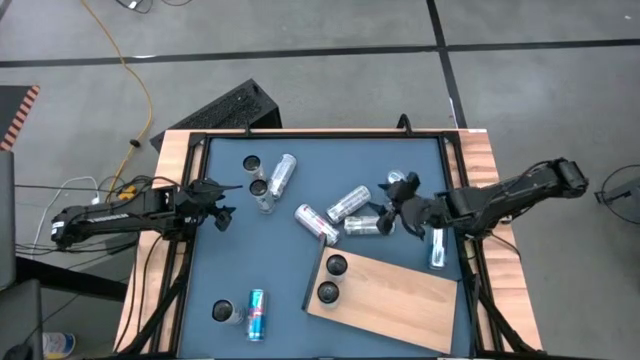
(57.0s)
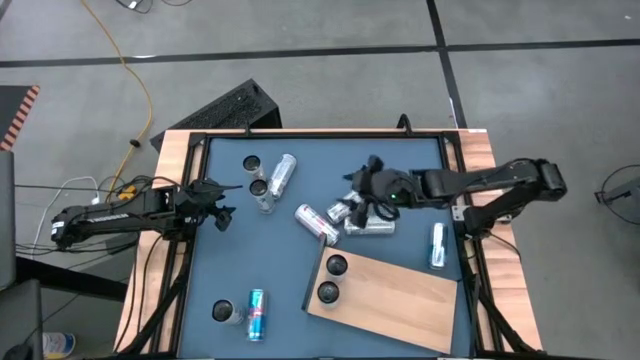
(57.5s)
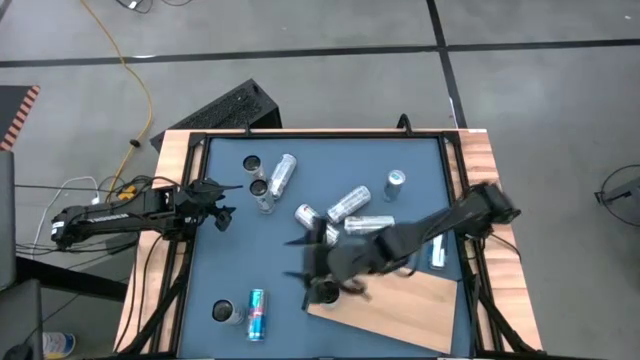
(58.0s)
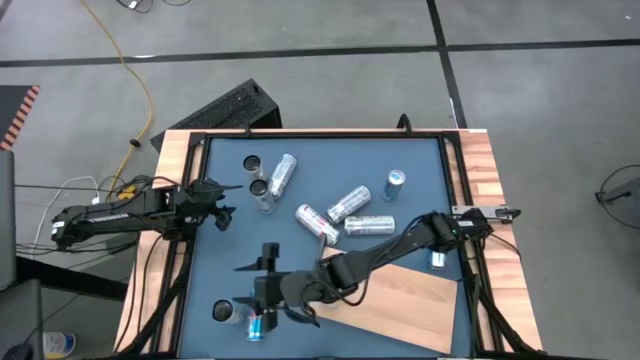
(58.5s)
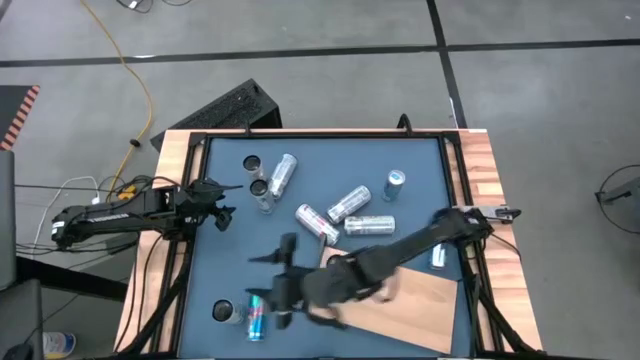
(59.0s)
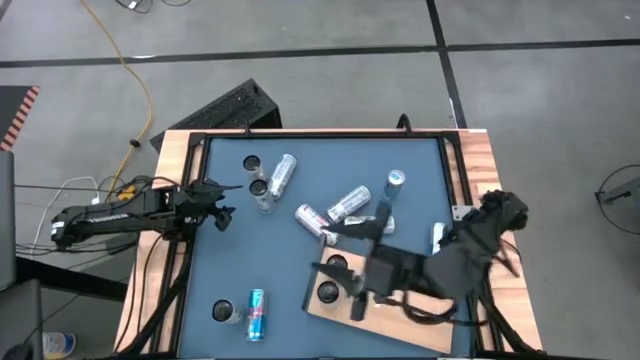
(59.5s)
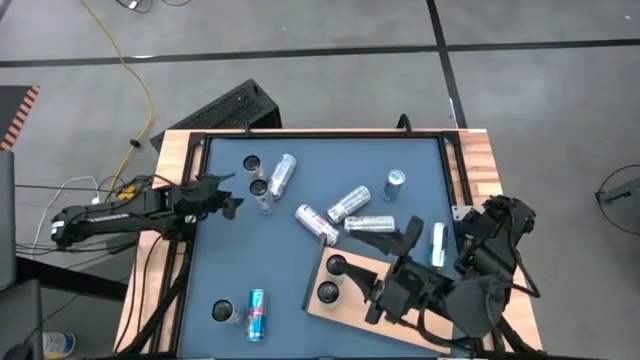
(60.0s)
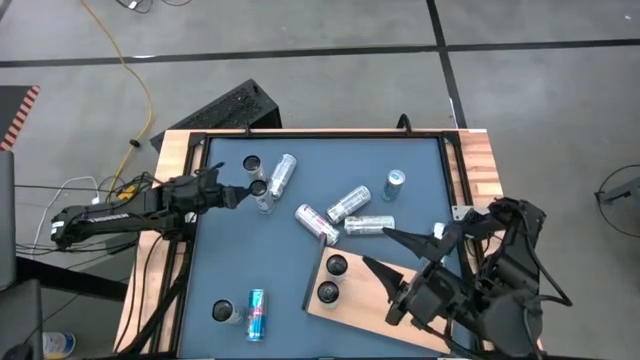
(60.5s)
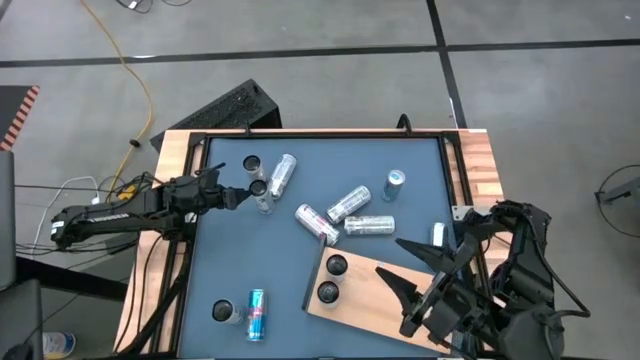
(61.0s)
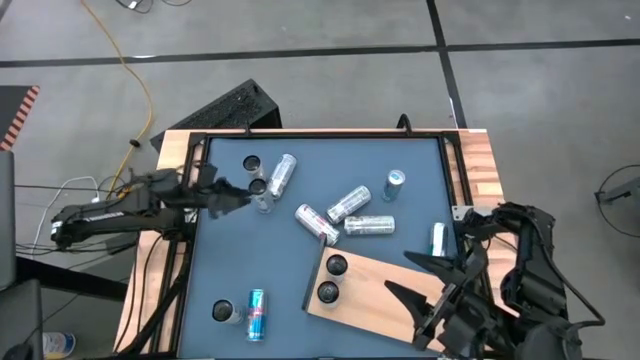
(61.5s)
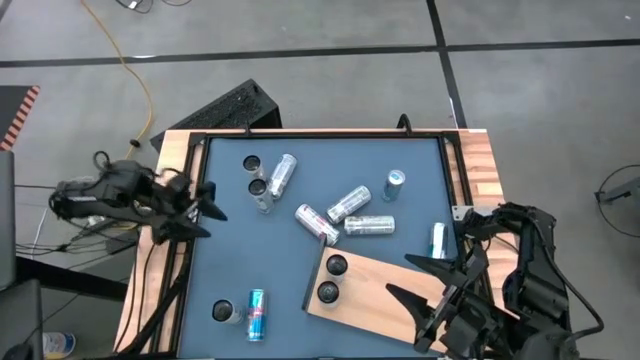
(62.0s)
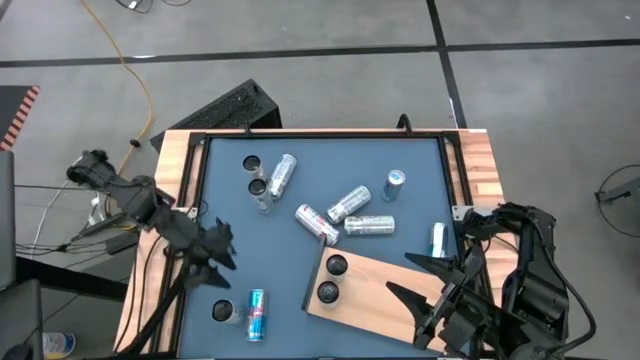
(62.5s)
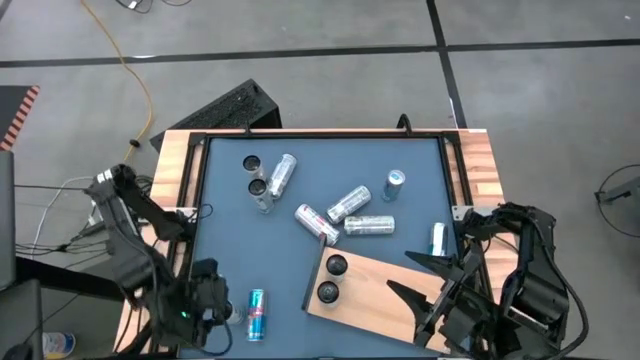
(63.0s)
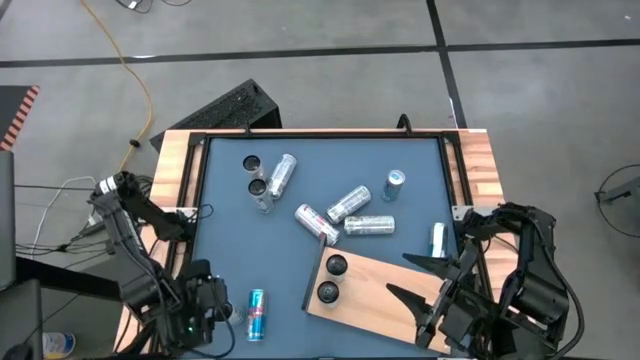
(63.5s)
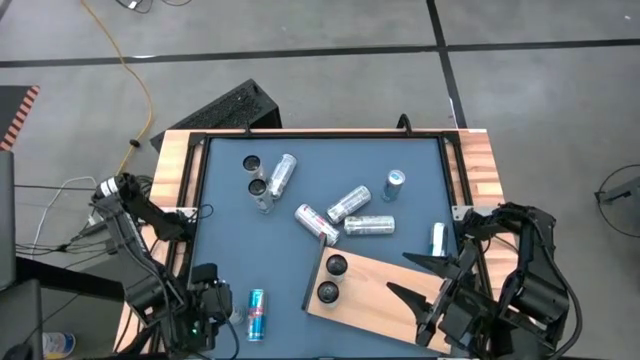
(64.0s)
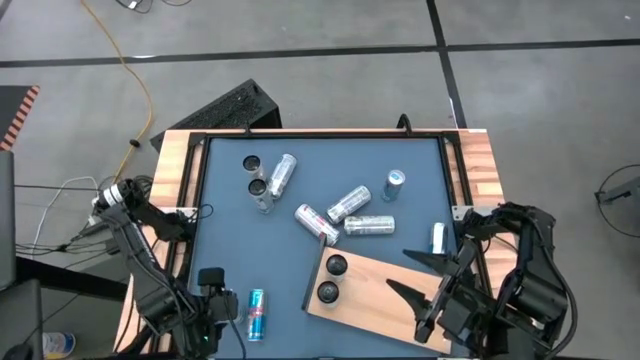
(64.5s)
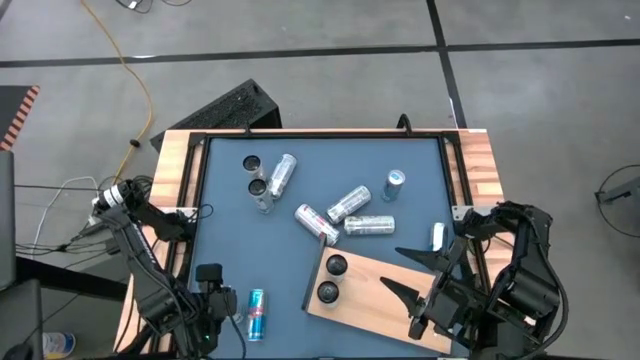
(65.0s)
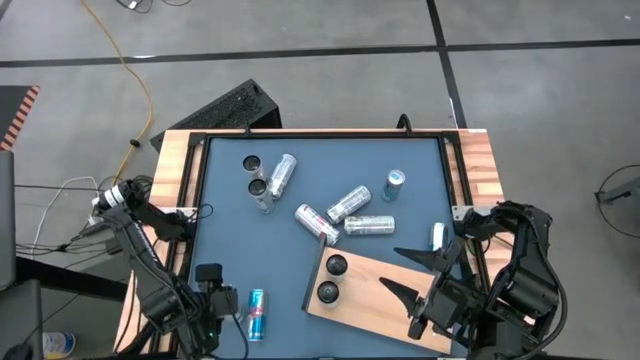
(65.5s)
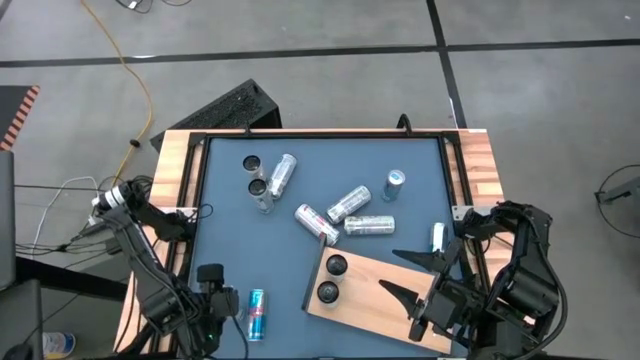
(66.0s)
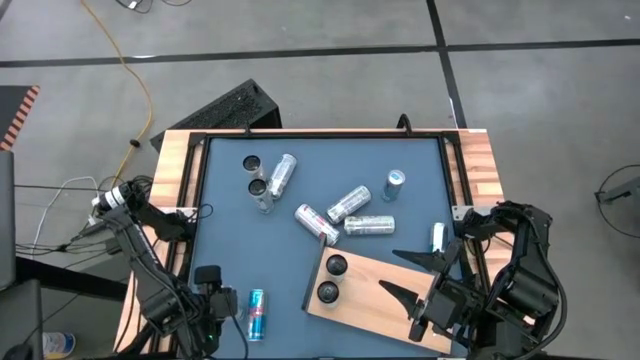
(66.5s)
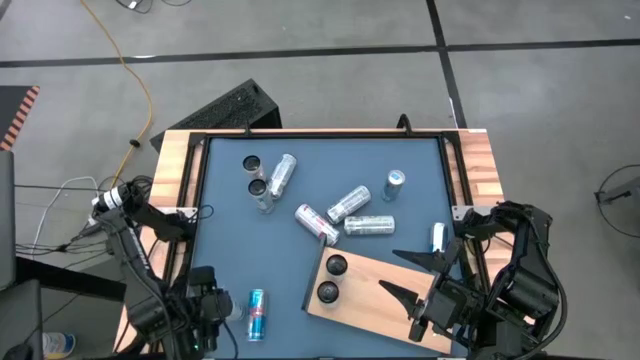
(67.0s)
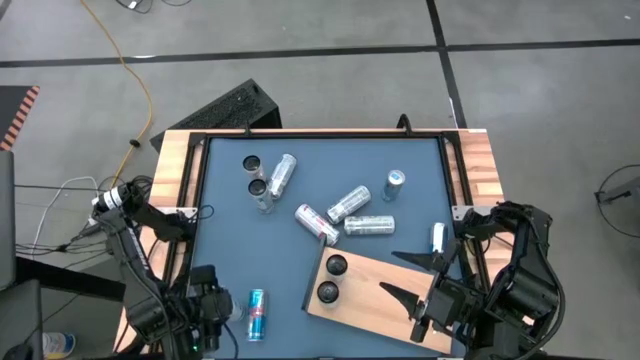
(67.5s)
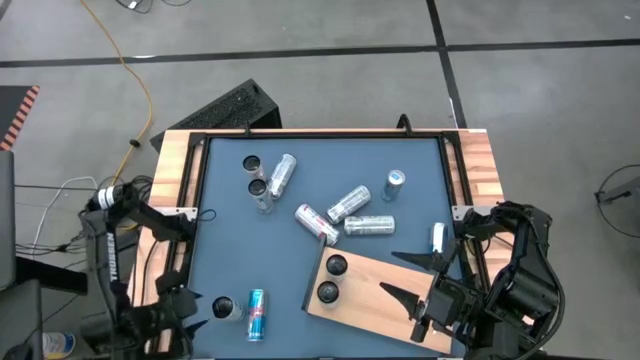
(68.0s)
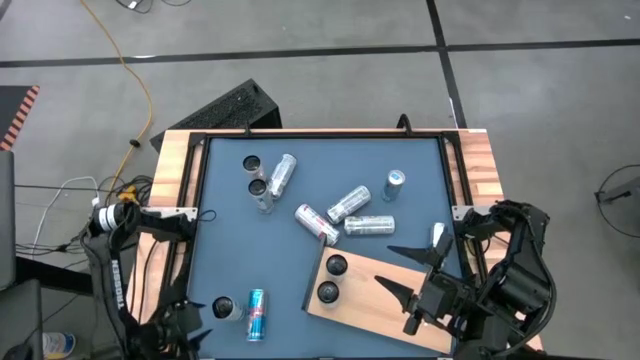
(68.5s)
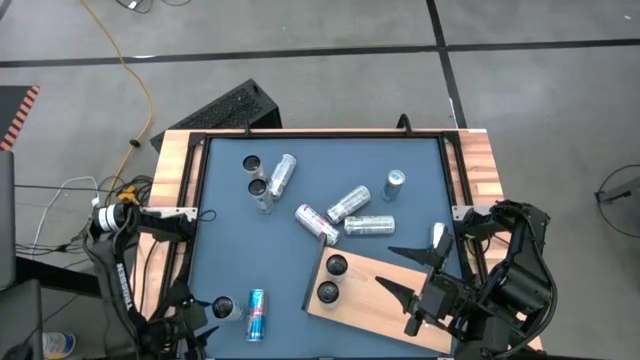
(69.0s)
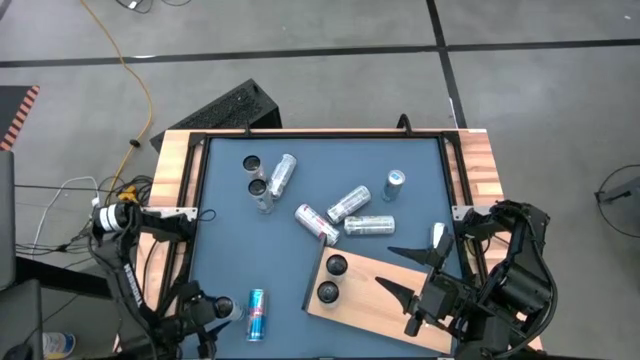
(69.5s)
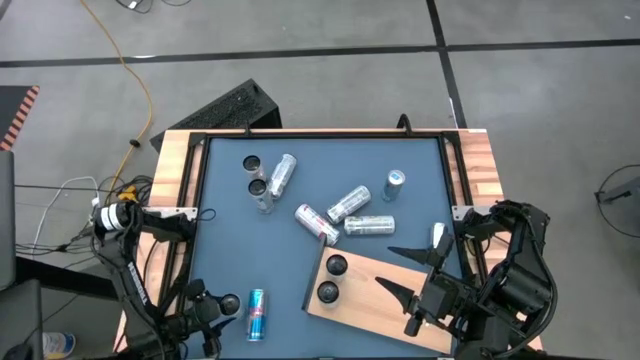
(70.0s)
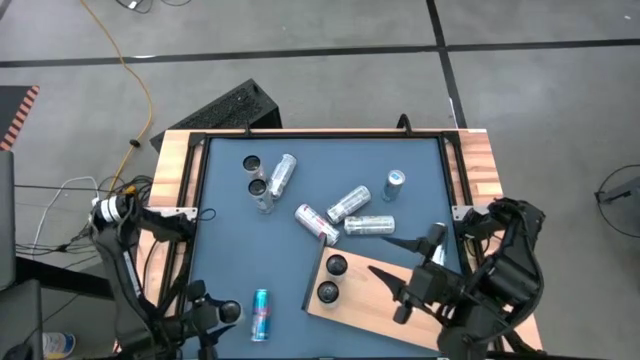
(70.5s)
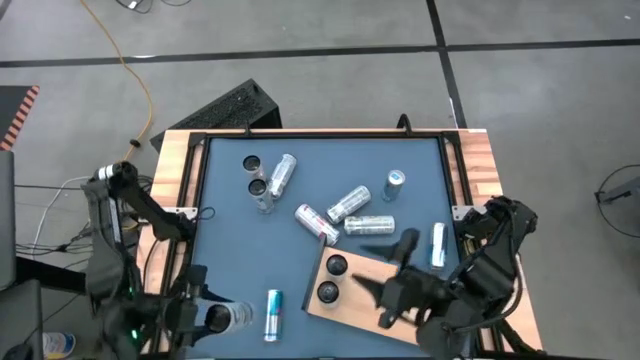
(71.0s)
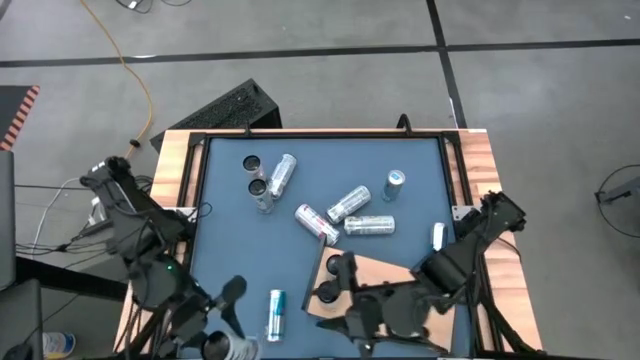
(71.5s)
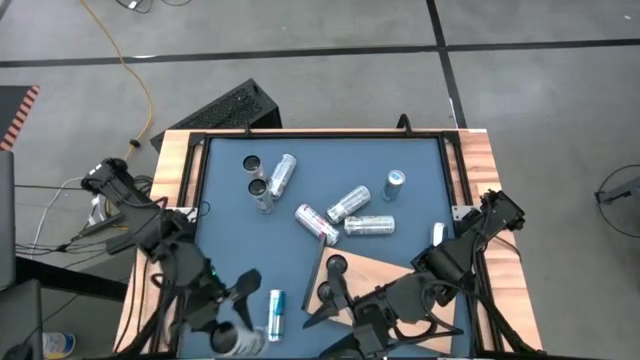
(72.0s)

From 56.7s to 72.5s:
Task: Place canned beverage on shelf
Put the white blue can on the shelf

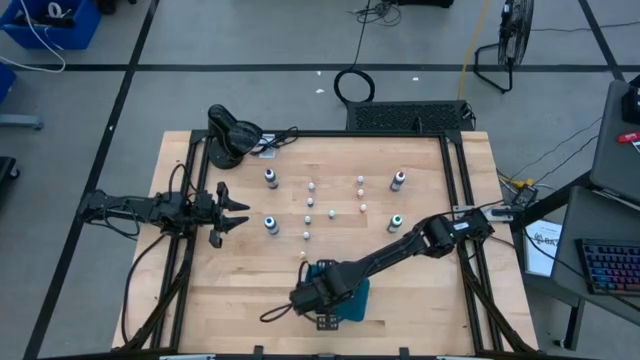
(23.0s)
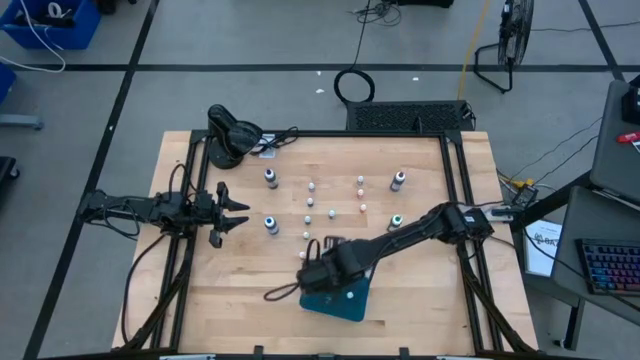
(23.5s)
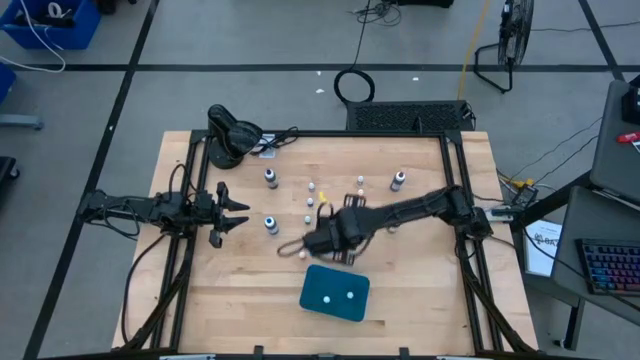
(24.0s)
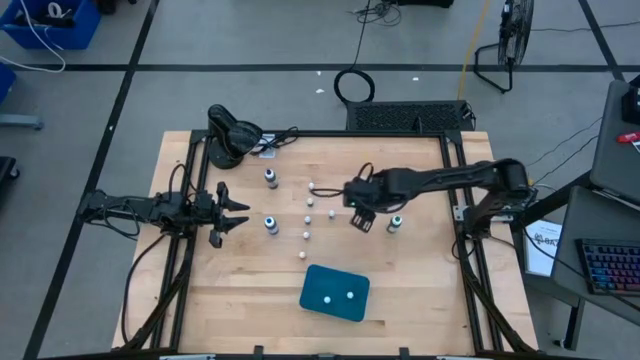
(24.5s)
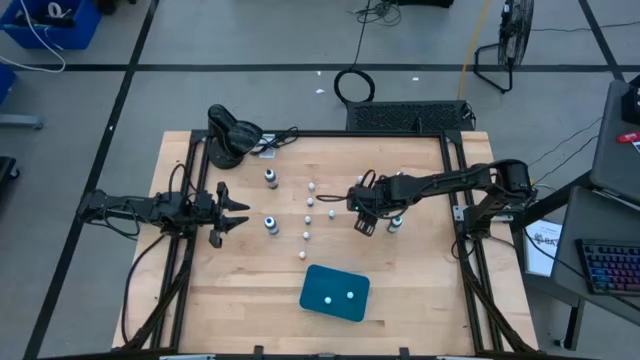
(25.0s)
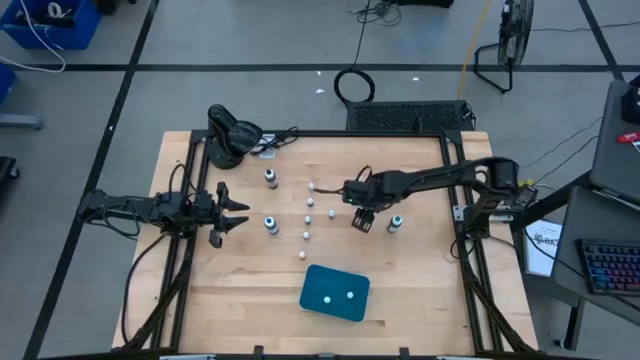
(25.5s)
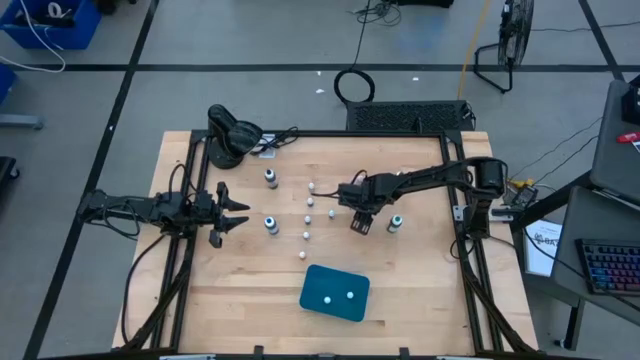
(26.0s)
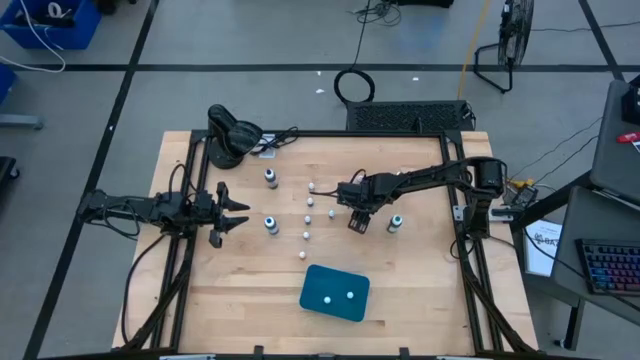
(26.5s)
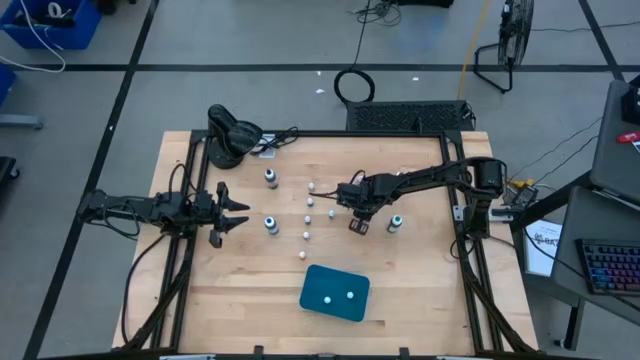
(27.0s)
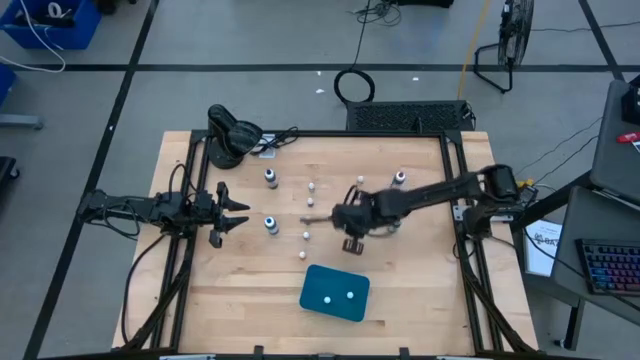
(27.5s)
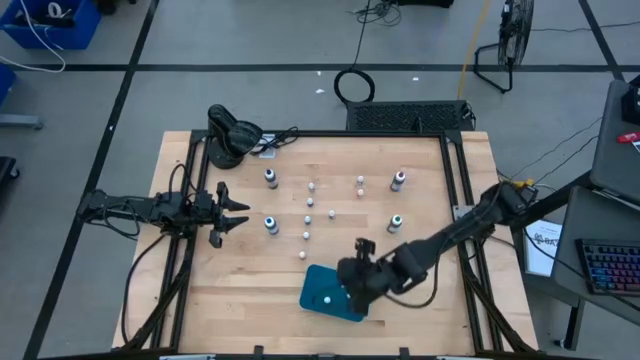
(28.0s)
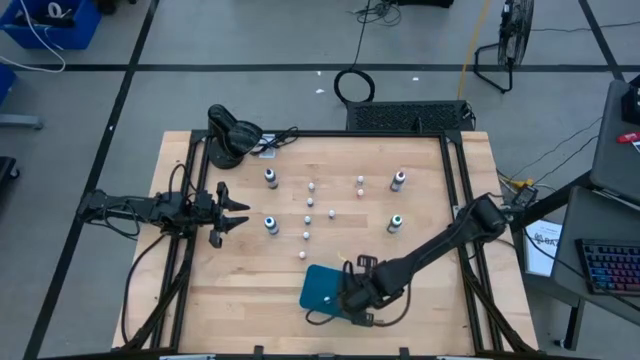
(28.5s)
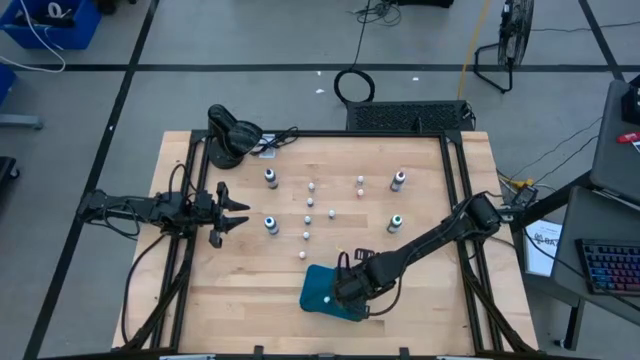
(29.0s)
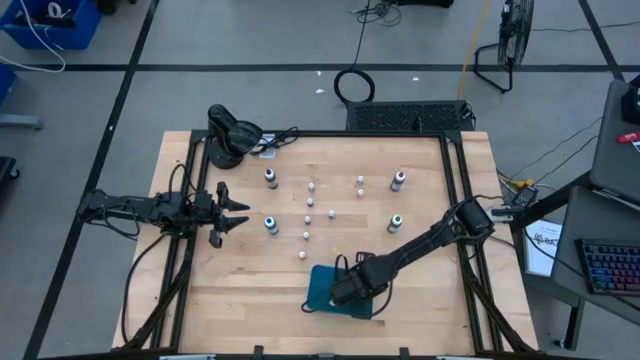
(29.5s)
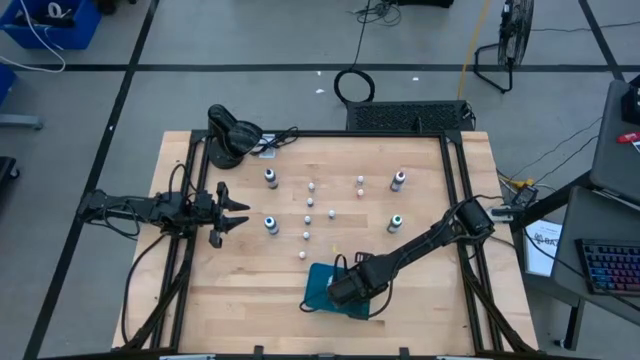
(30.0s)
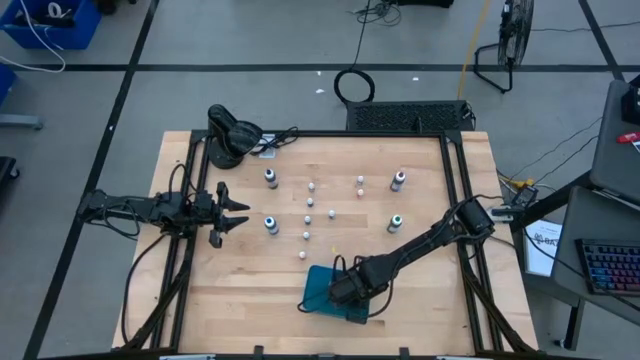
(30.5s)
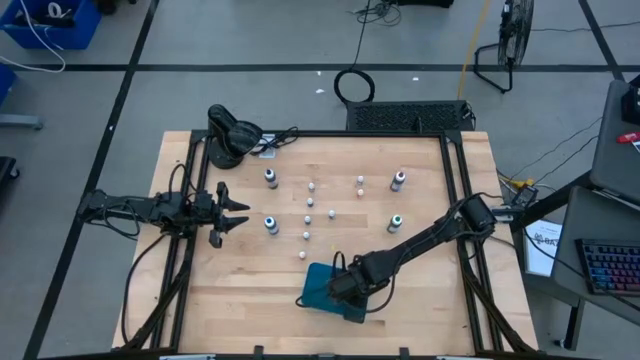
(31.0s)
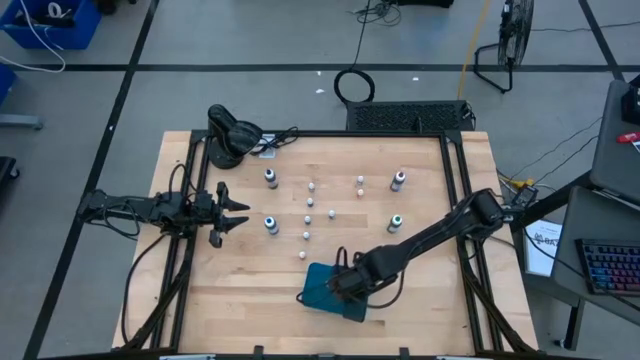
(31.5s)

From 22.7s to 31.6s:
Task: Pick & Place food coloring
Put the small yellow coloring bottle into the blue bin
